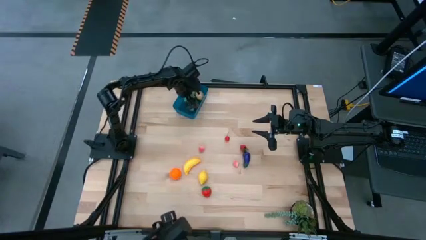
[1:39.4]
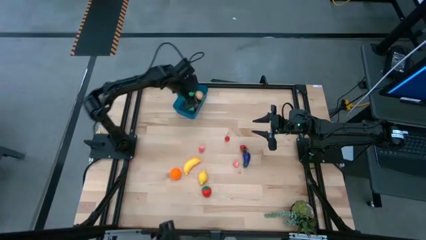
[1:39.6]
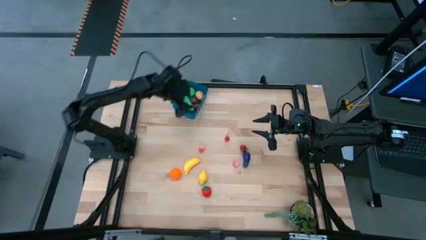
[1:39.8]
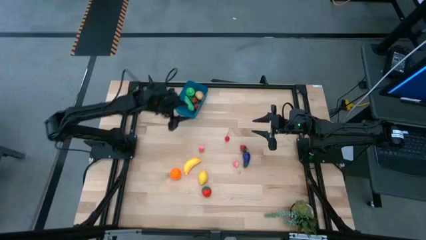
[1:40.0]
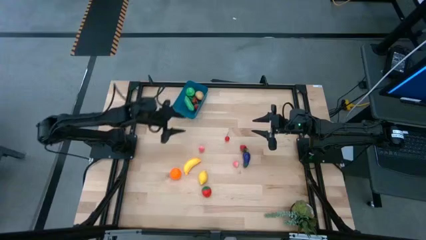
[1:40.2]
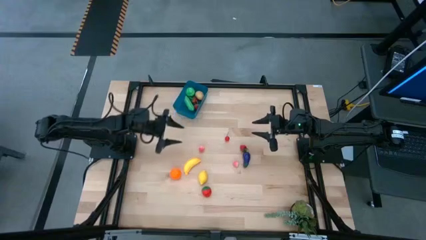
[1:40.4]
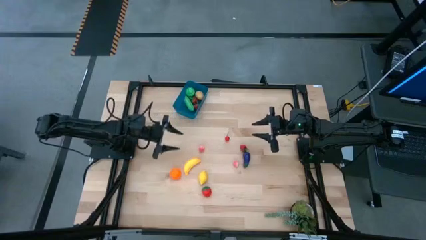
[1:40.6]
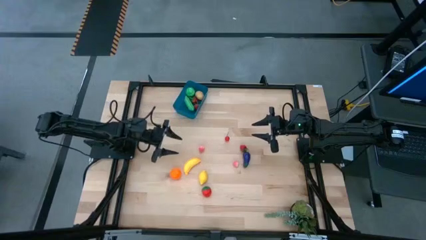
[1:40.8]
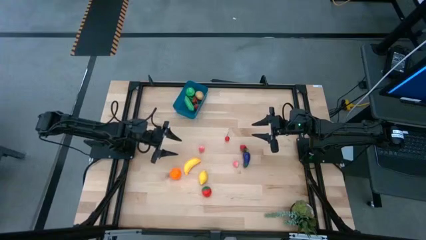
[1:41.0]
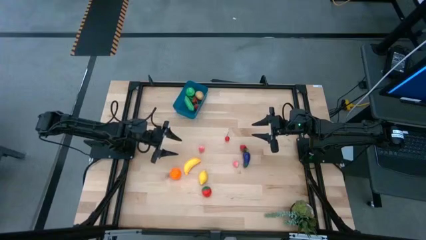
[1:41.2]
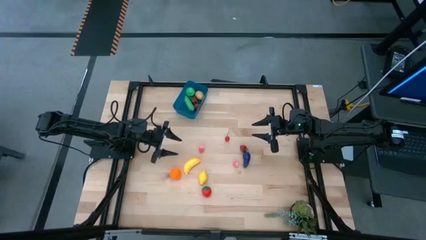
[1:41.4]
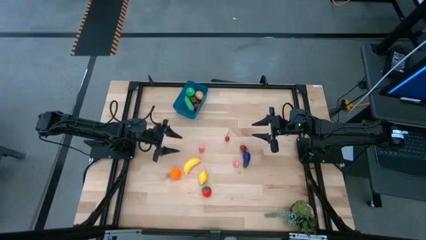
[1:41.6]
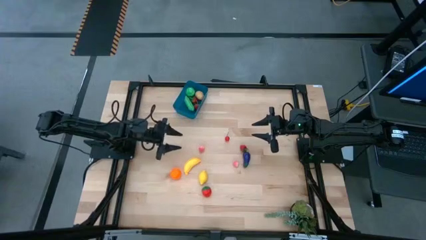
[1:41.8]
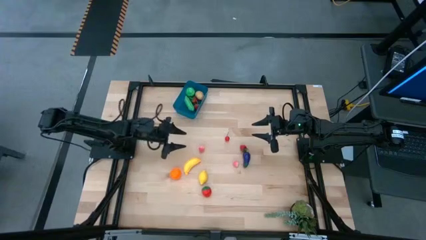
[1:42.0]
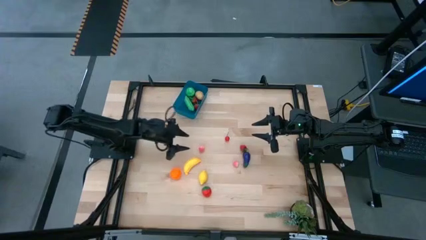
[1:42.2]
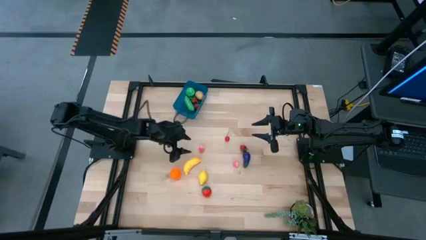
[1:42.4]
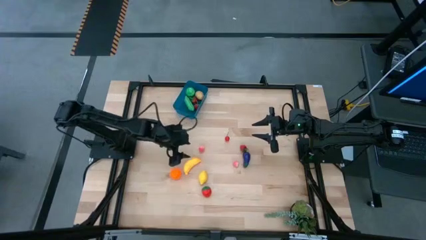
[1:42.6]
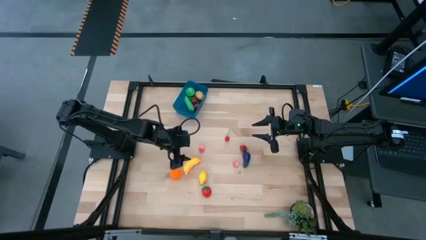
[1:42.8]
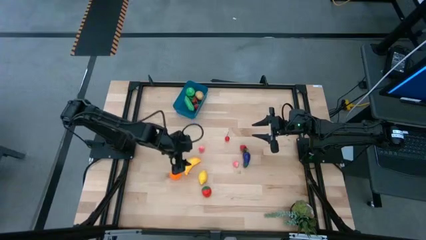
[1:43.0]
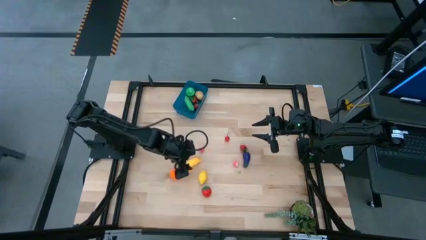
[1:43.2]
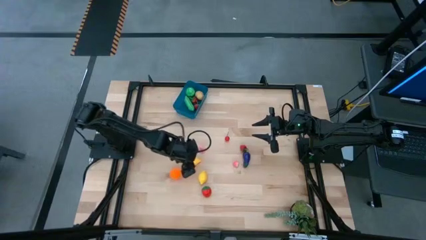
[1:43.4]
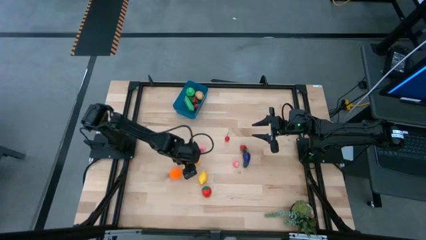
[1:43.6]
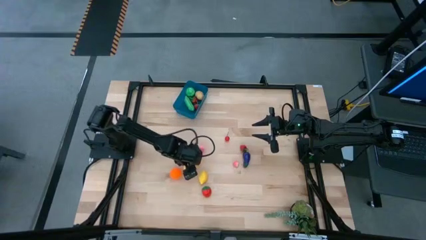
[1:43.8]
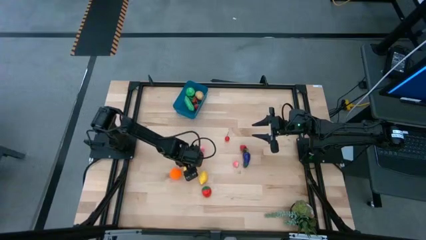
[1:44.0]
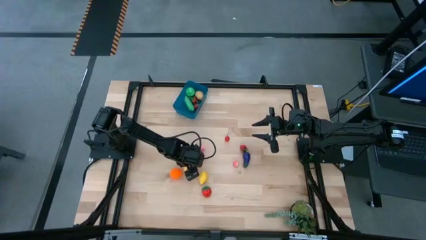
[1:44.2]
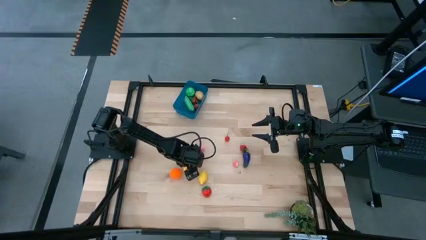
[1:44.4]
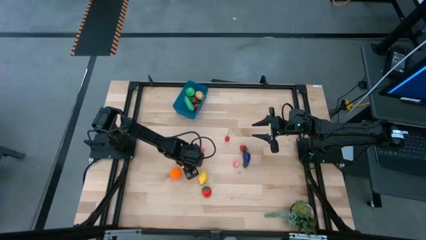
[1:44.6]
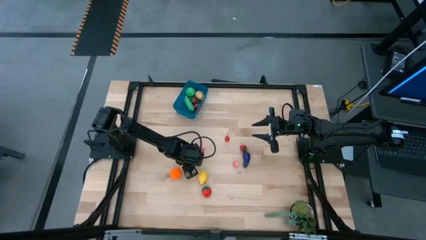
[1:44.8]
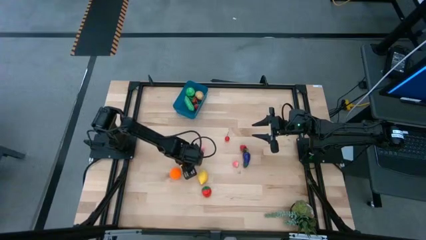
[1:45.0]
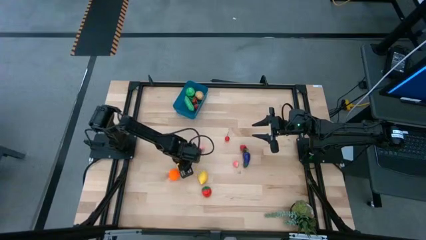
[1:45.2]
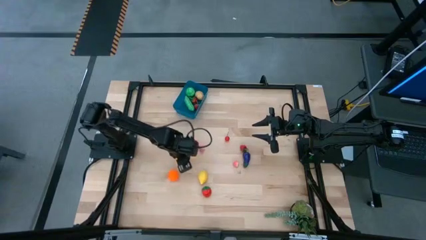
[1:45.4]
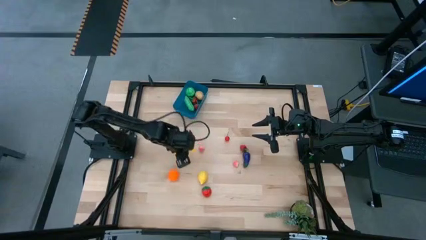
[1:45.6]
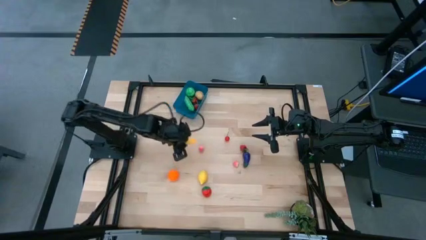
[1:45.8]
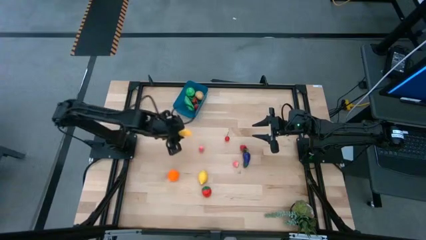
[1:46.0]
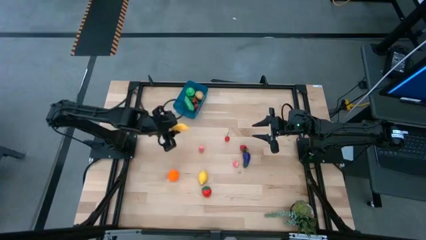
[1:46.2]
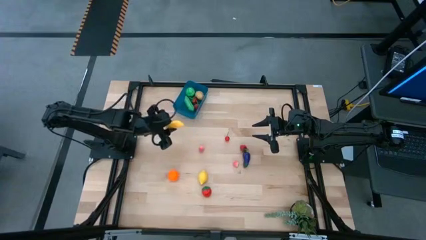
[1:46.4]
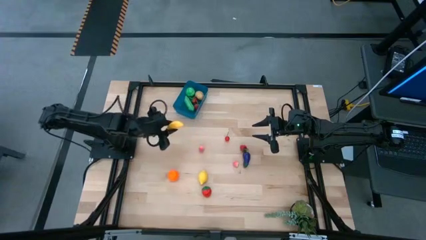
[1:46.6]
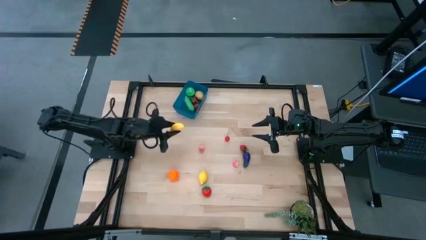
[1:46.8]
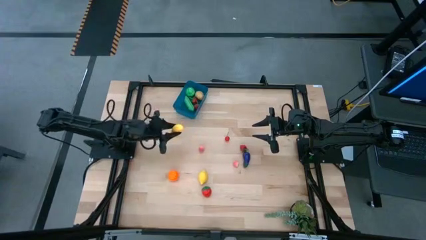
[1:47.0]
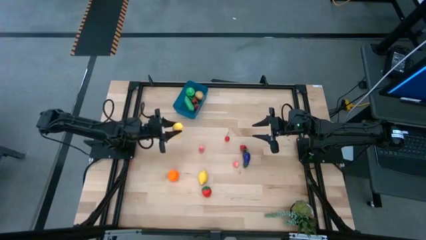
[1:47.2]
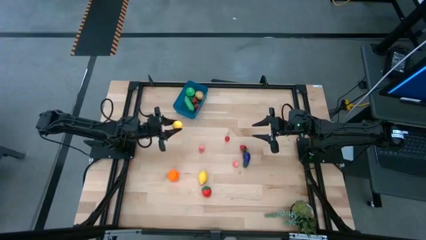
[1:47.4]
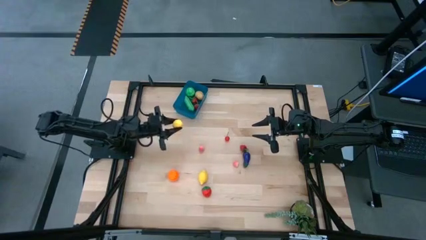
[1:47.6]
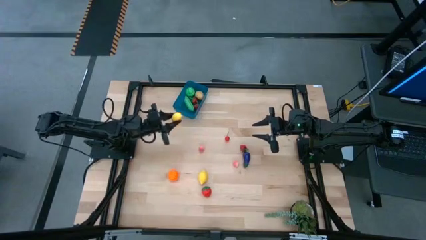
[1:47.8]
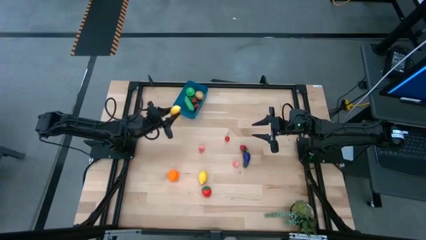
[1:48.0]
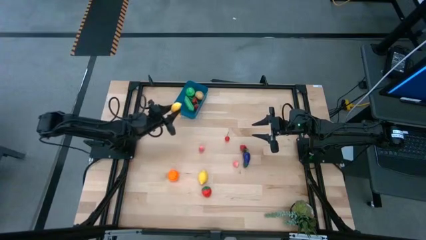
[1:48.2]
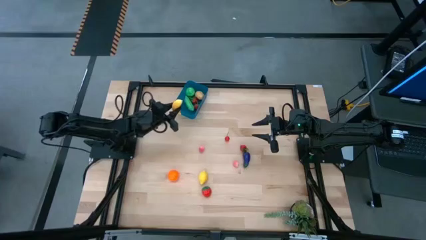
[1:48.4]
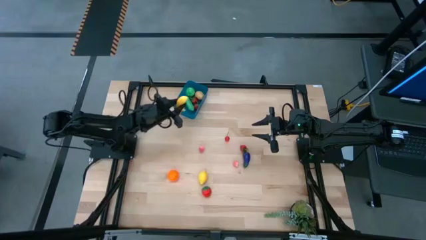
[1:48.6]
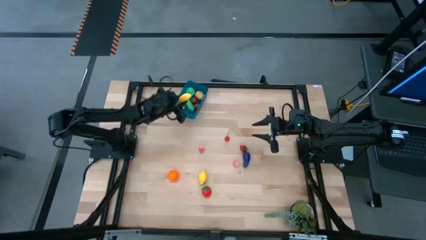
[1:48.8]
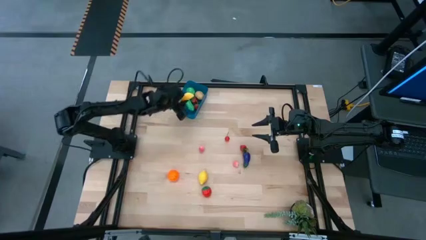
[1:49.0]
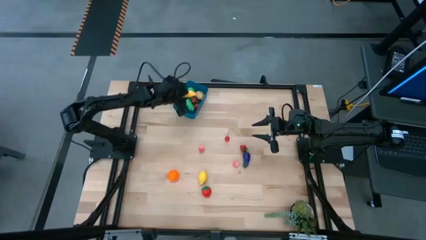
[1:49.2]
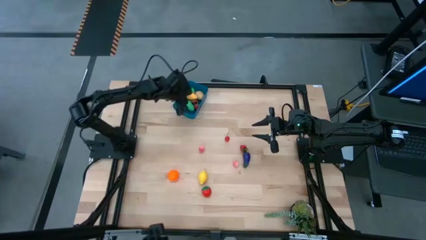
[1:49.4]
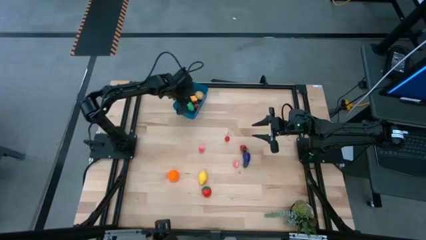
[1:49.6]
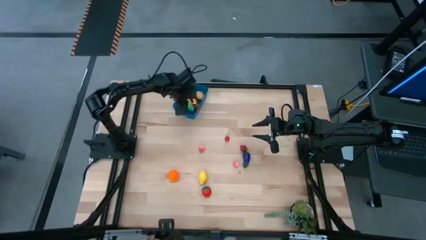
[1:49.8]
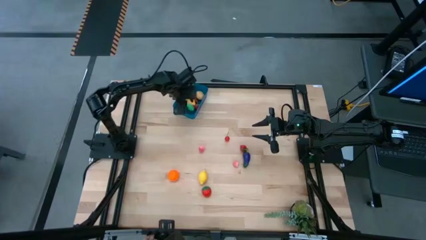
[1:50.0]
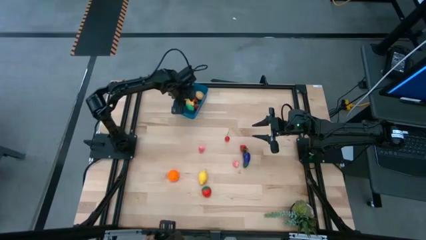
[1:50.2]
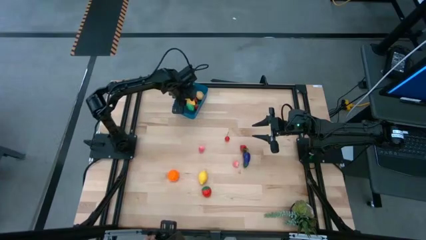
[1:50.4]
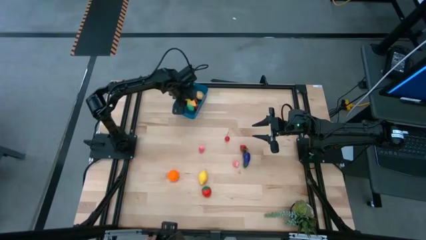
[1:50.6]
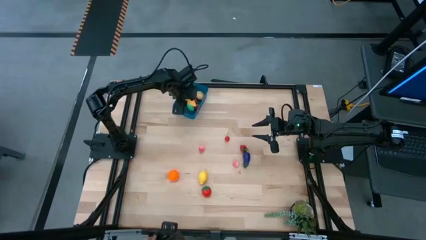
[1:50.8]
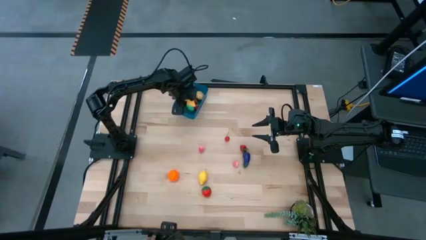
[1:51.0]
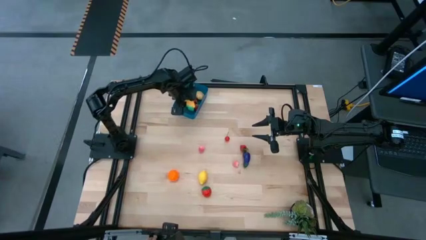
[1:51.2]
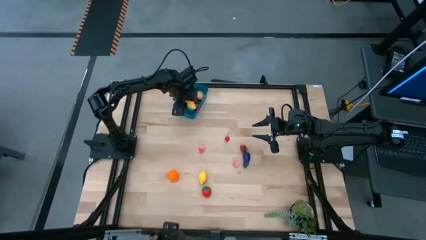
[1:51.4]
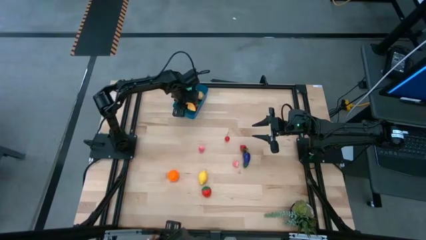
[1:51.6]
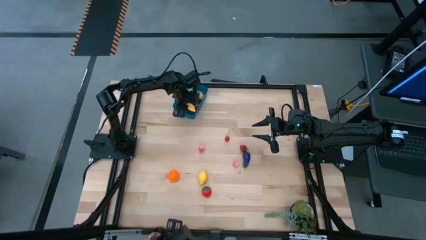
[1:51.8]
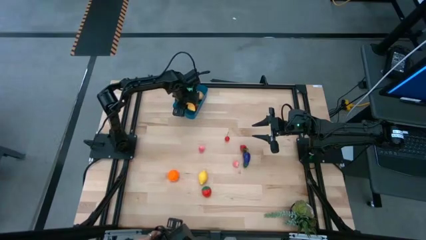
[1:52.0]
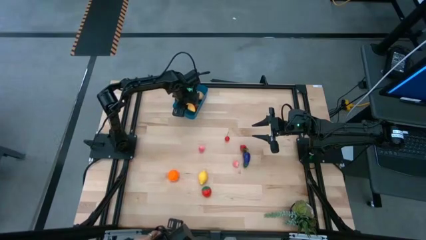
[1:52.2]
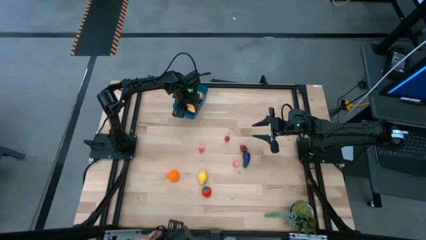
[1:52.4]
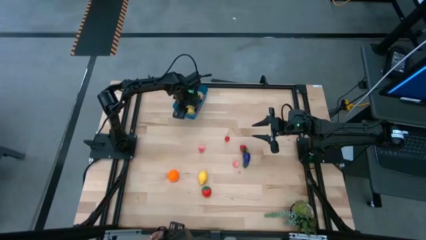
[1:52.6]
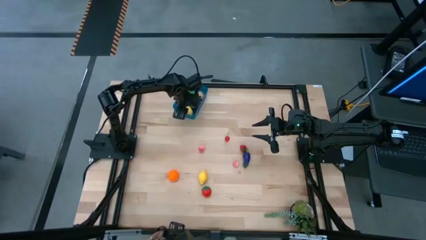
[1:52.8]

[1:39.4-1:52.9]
Task: Pick and placing Produce into tupperware
Put the yellow banana into the blue bin
